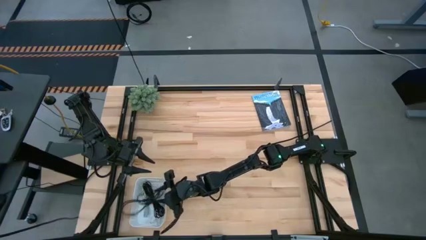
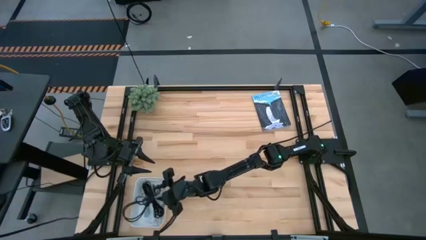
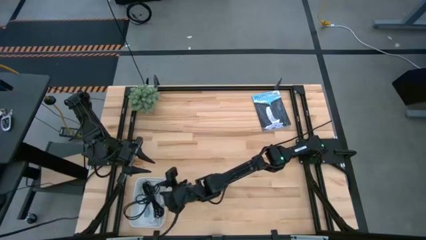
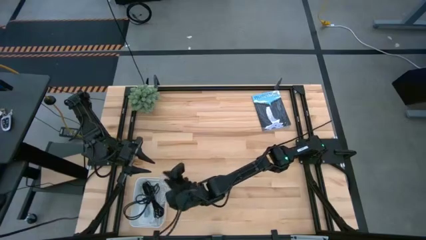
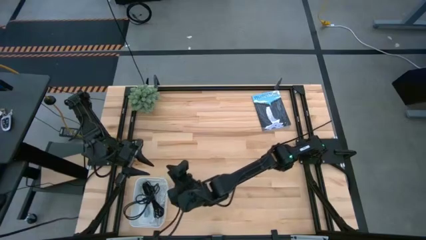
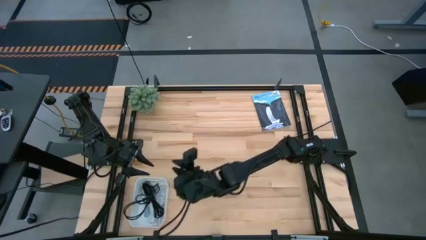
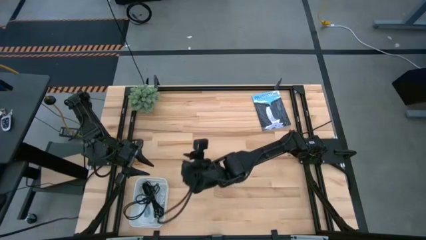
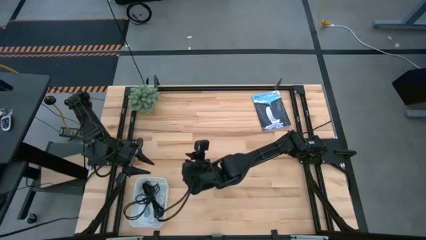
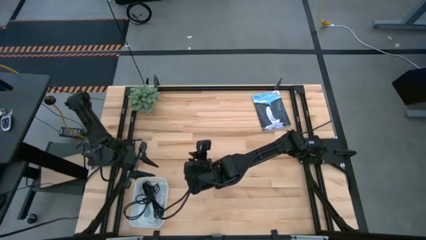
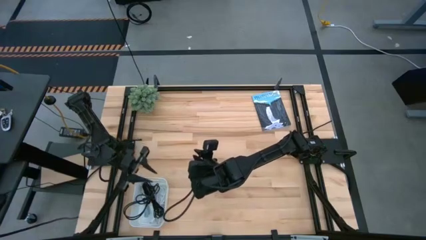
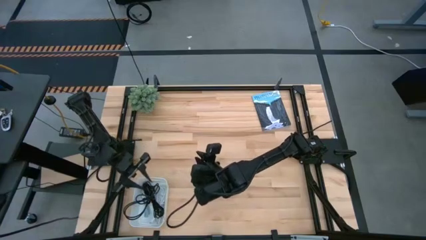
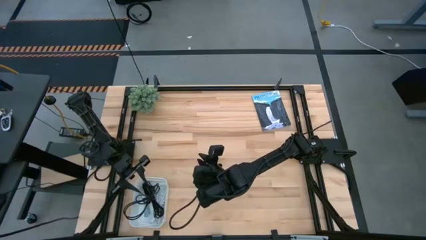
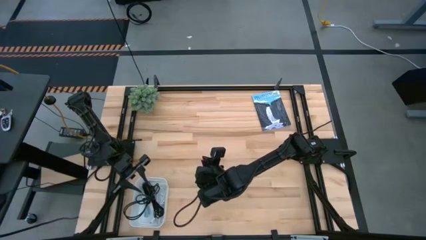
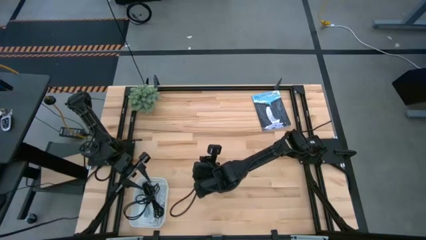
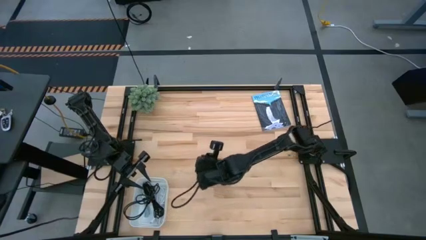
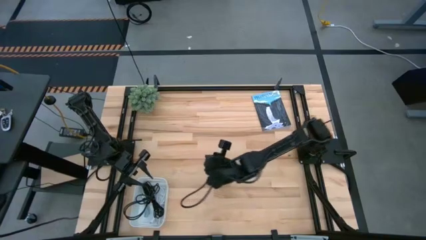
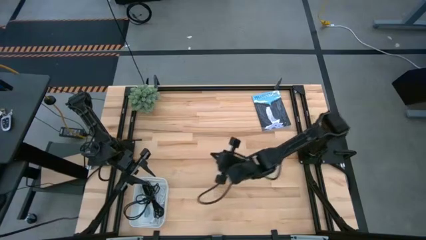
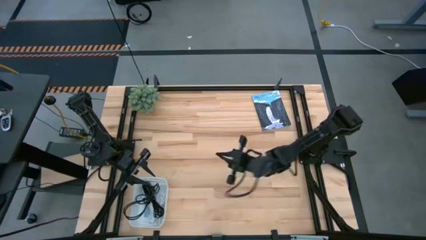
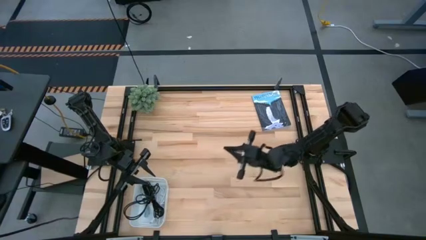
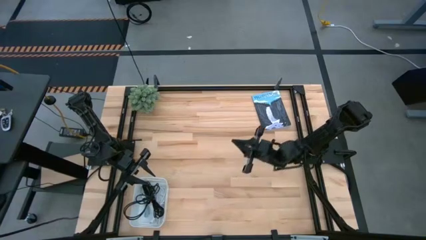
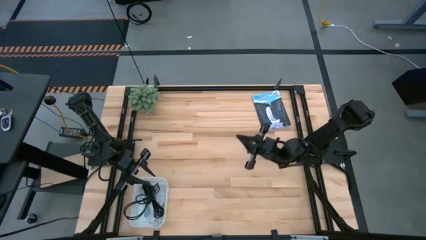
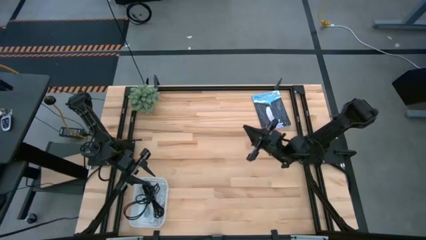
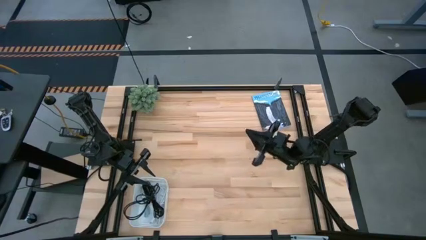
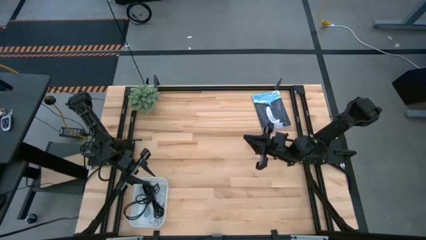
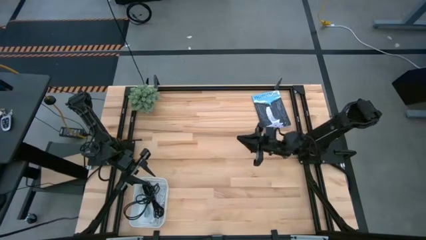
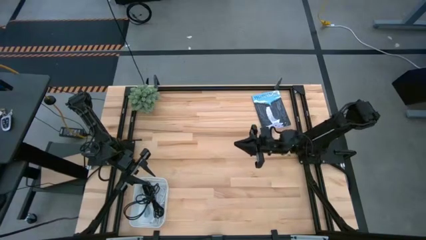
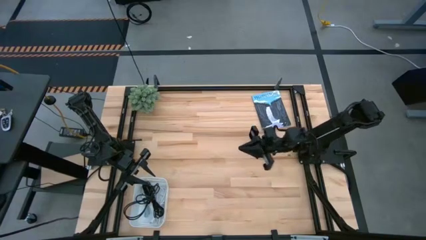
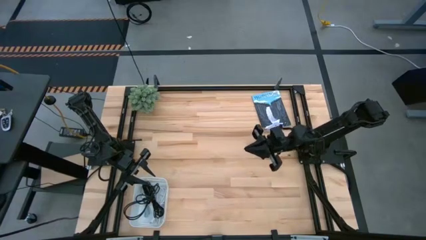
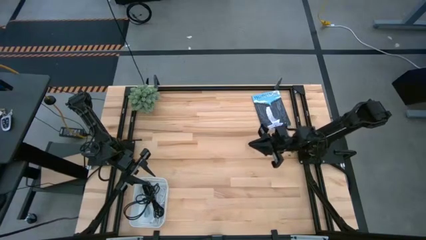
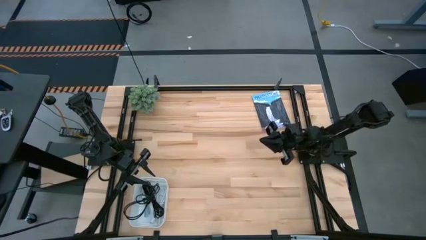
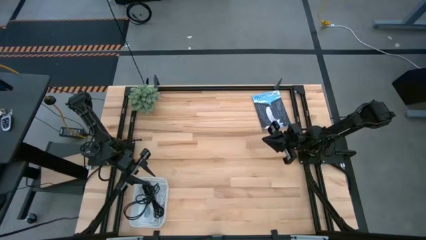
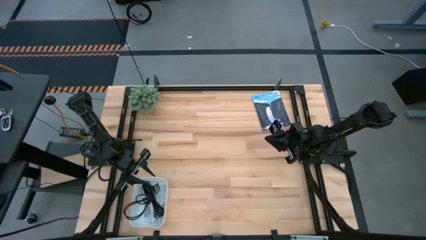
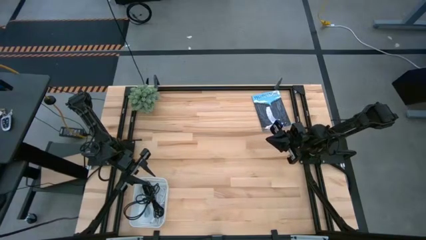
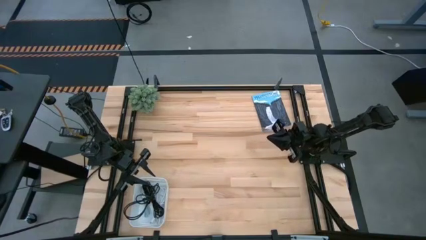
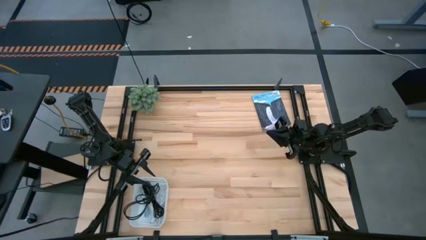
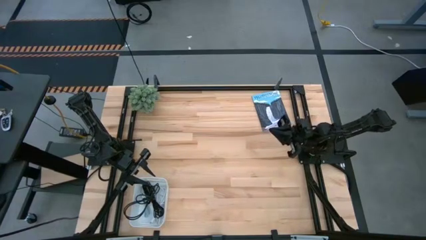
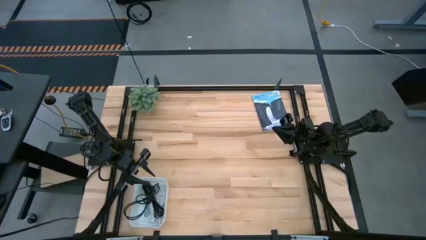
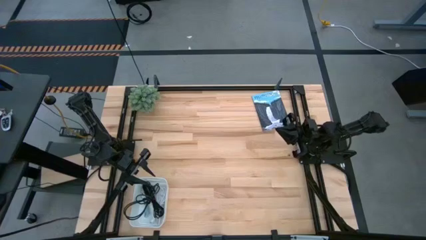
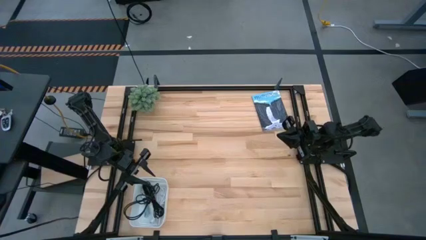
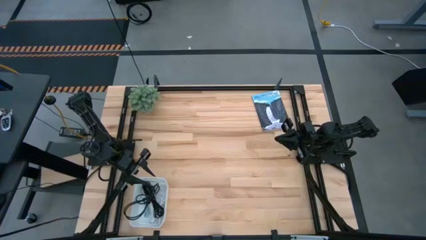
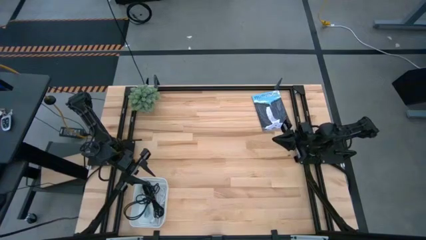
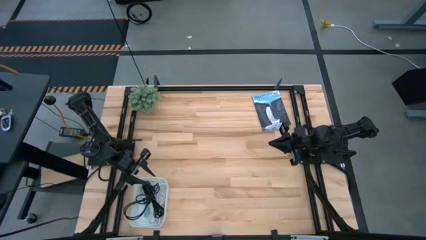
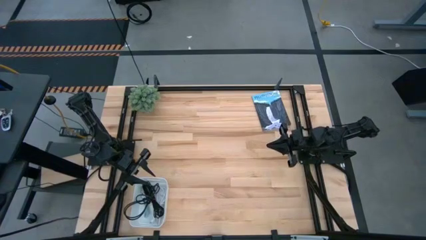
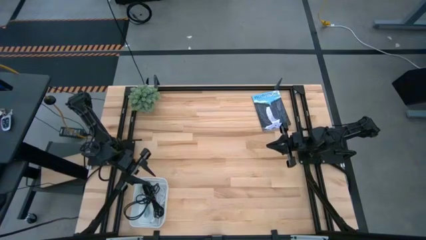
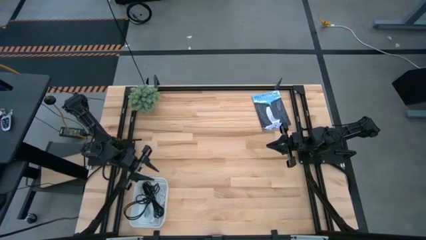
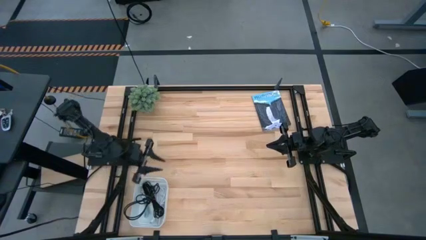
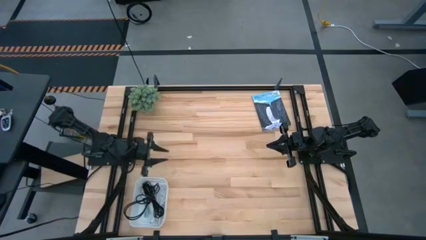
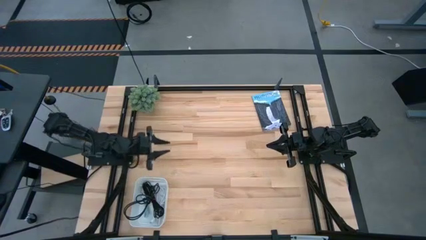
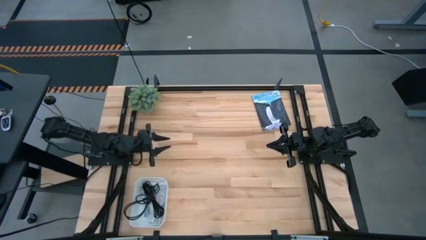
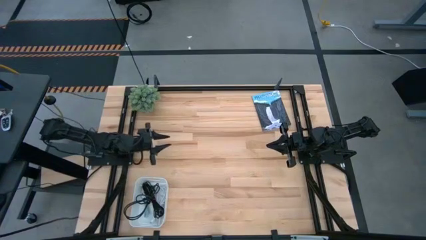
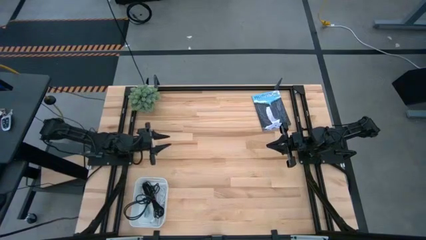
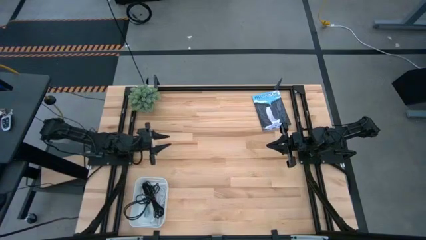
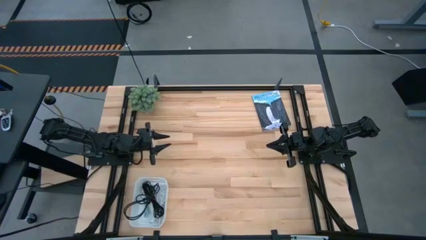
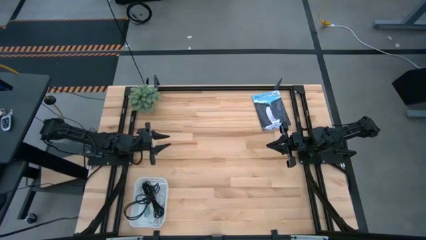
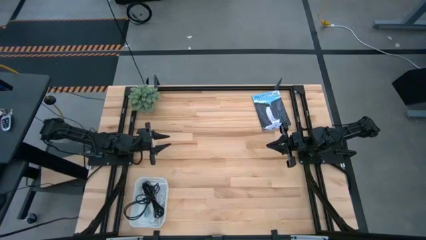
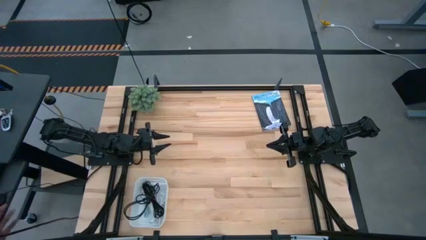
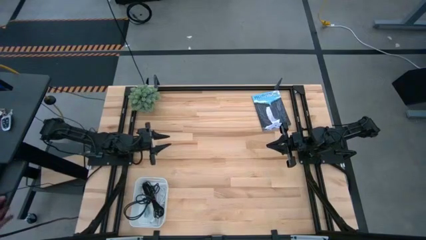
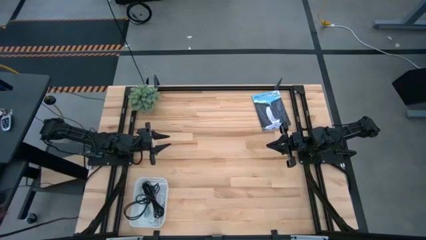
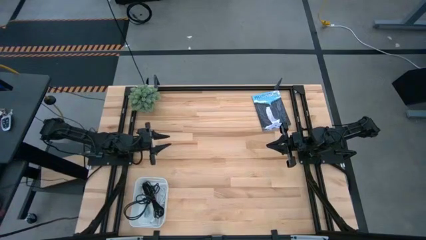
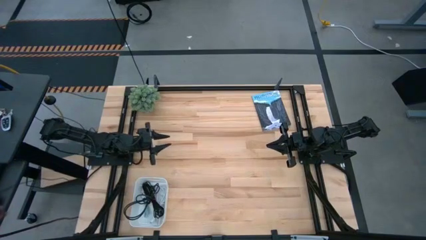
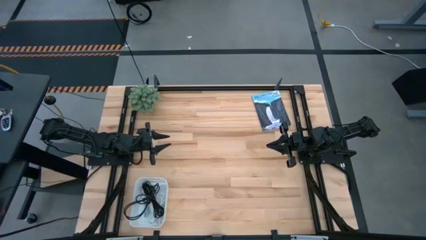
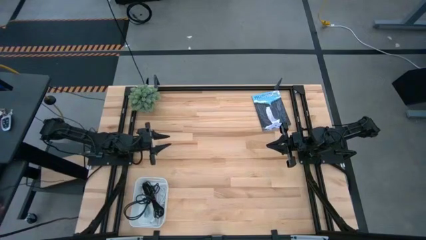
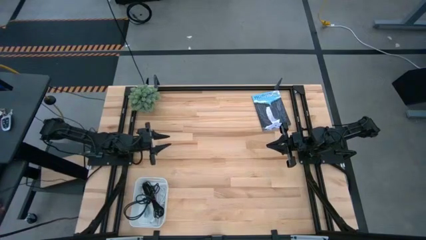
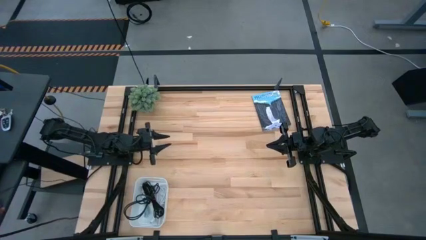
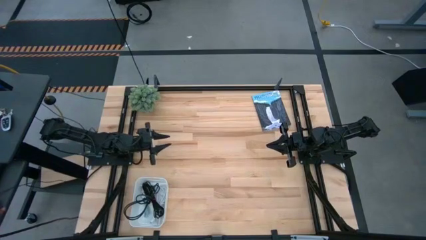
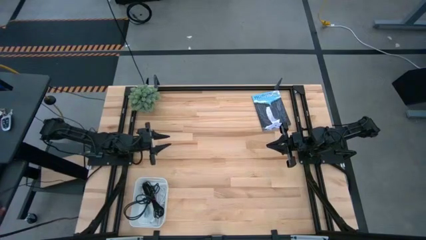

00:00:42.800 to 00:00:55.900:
Task: Pick and place USB-C Cables
Return to Home Position
